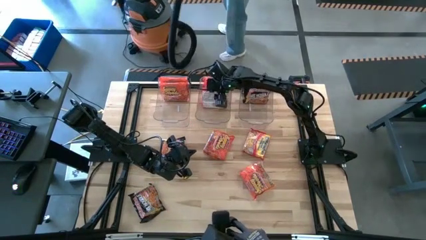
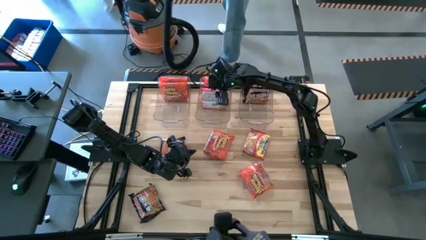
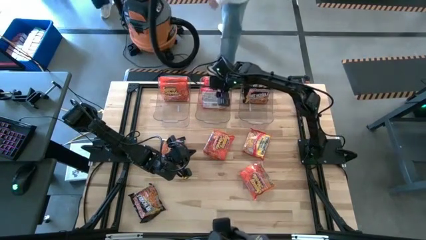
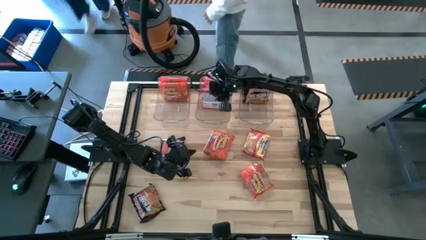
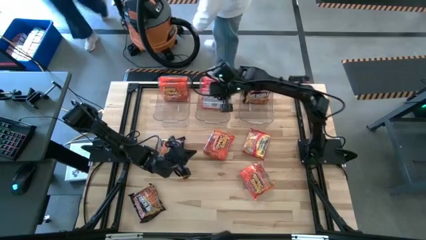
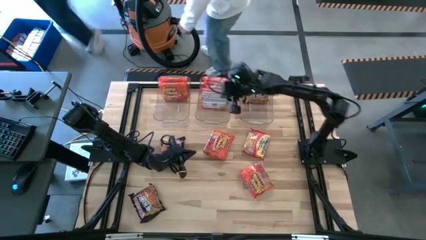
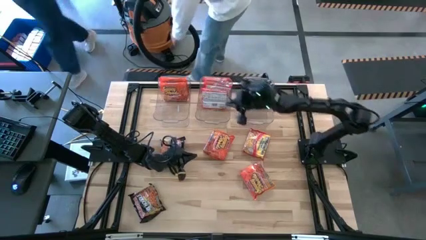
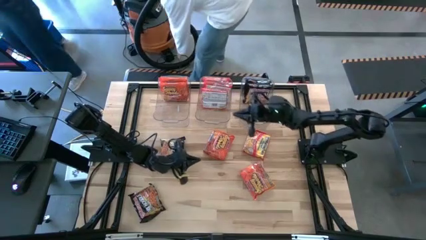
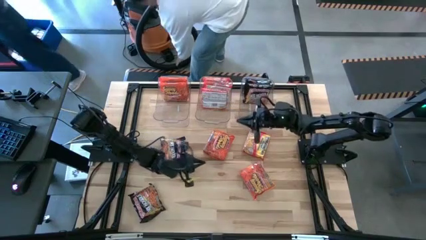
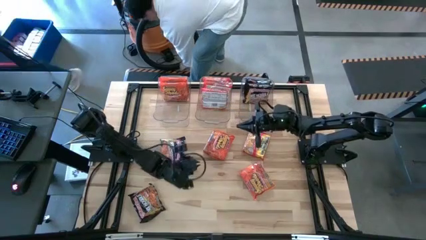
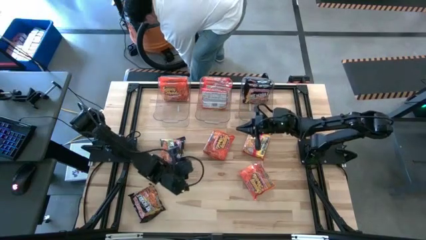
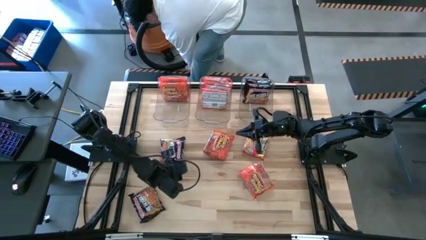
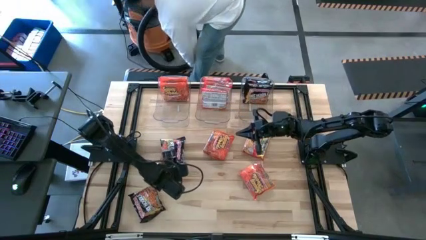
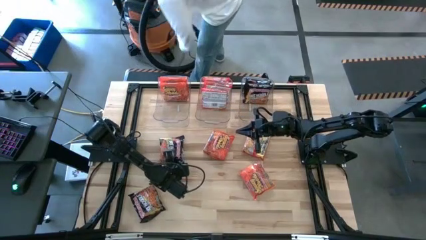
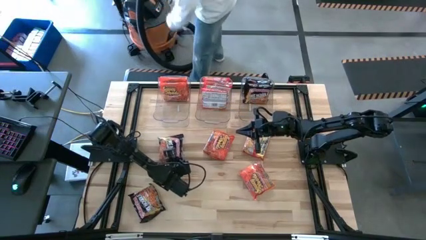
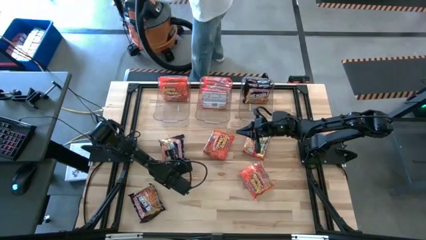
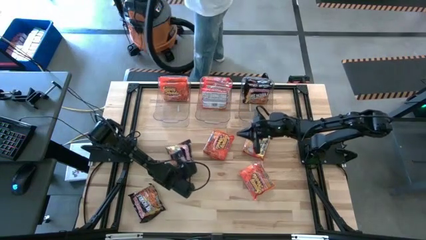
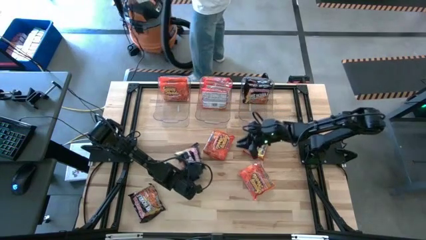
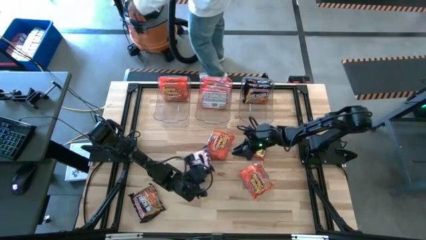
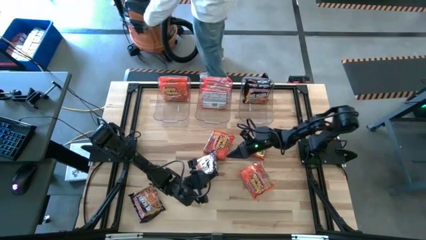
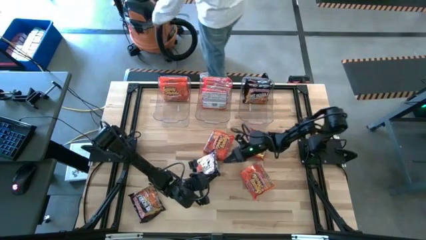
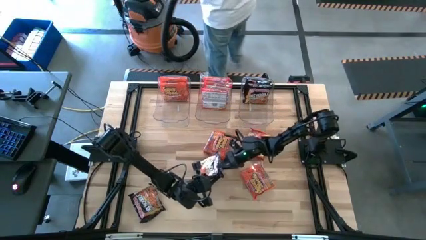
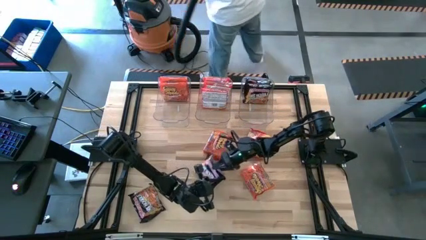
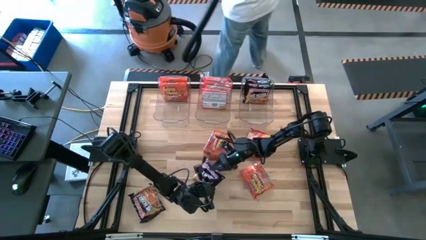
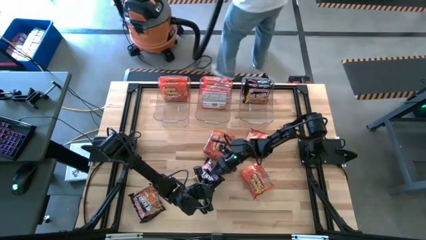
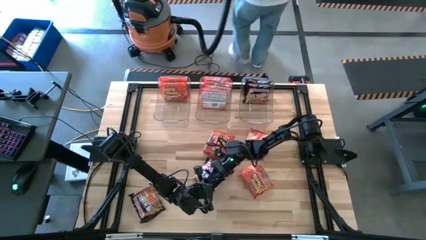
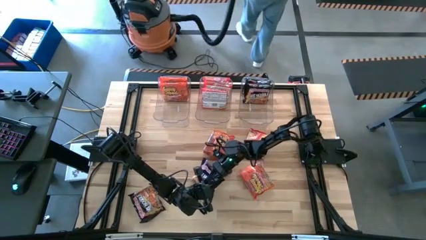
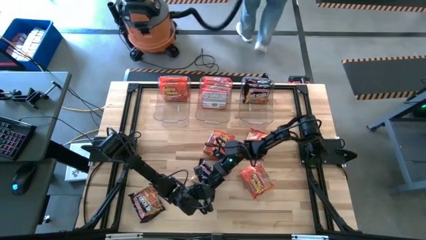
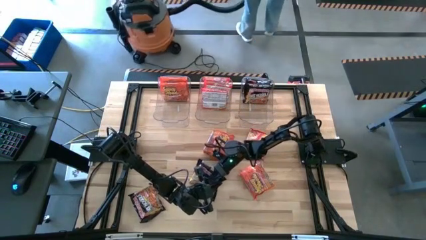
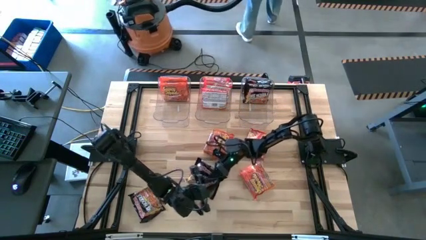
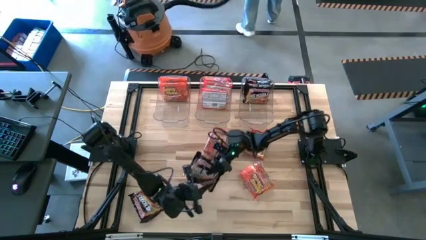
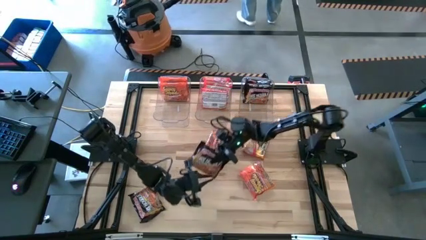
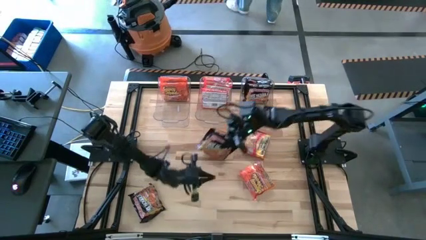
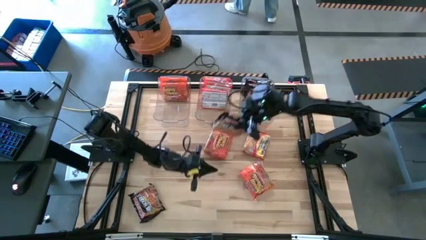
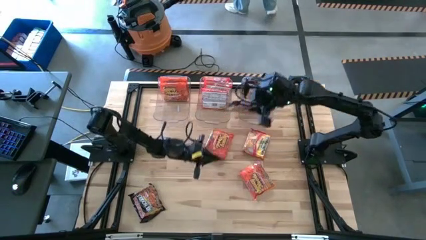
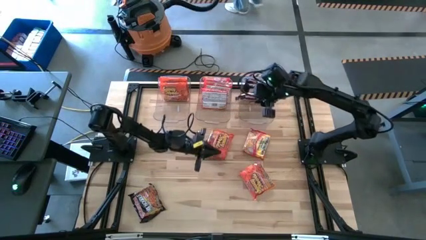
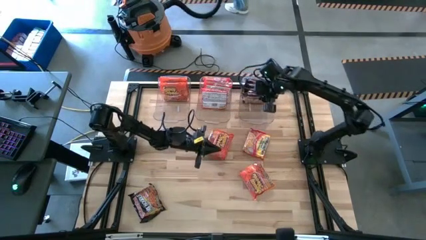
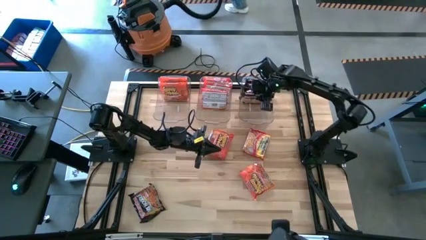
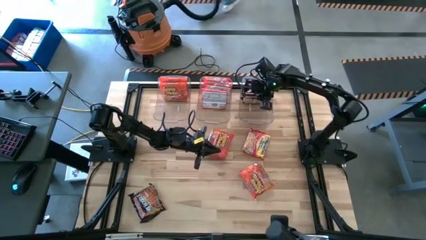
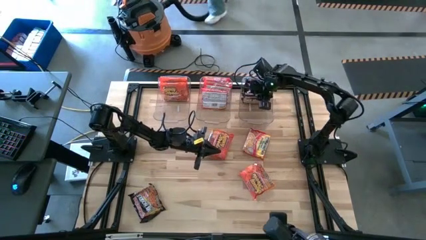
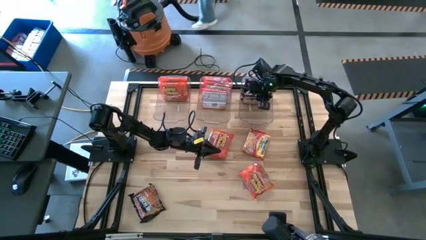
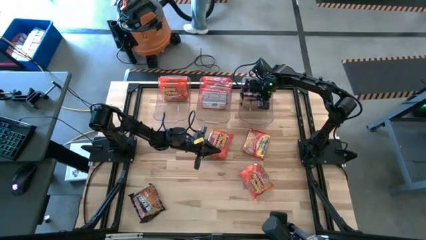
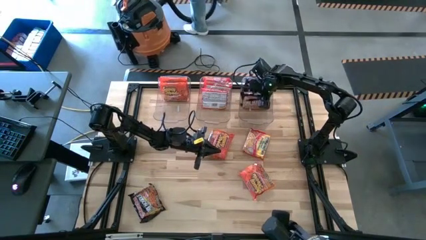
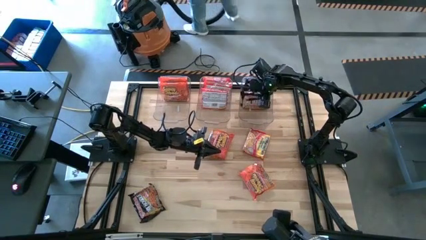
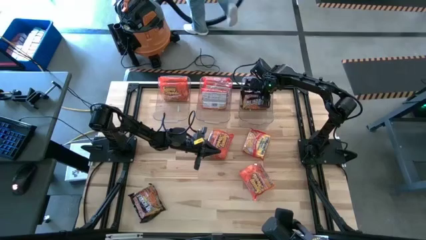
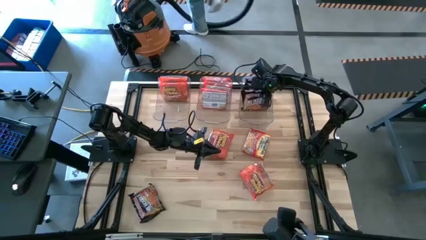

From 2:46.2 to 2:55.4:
Task: Sort Maruchan noodles
Put the black noodle pack into the right transparent bin

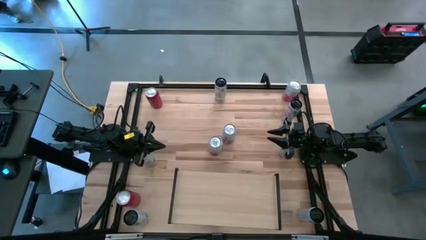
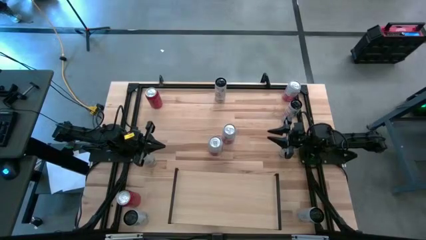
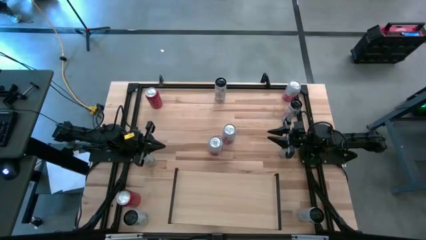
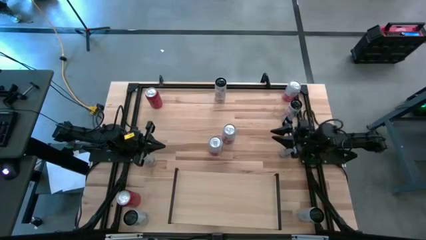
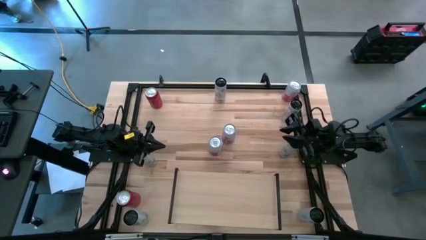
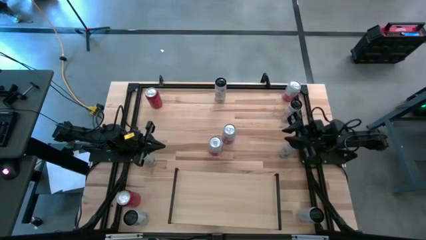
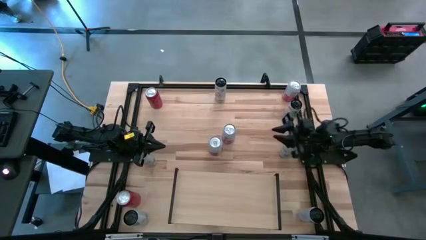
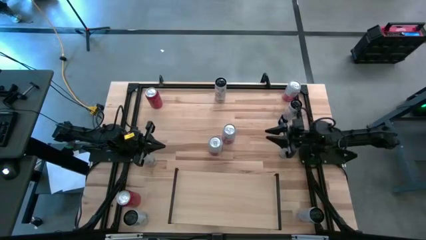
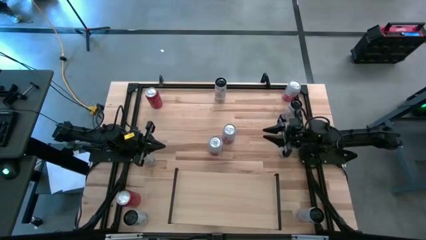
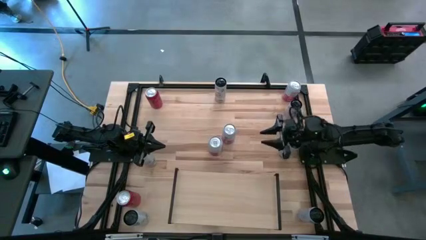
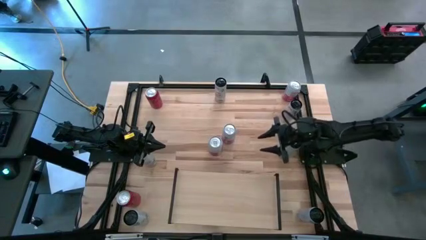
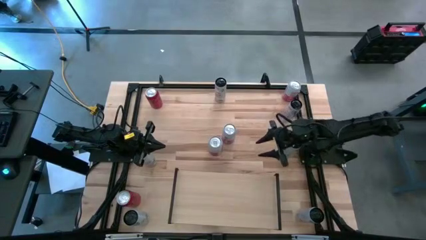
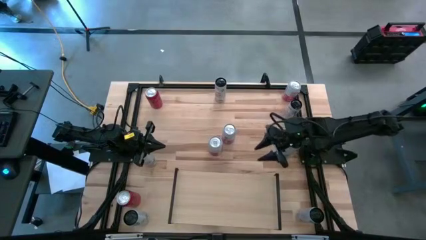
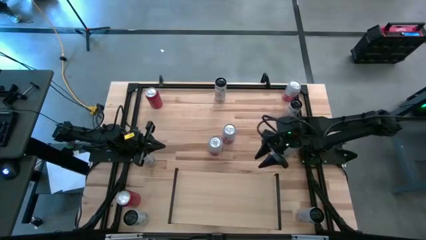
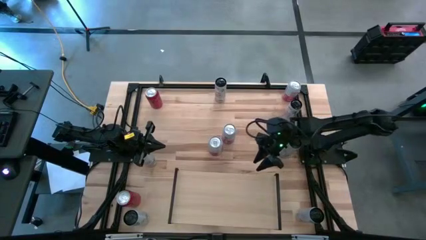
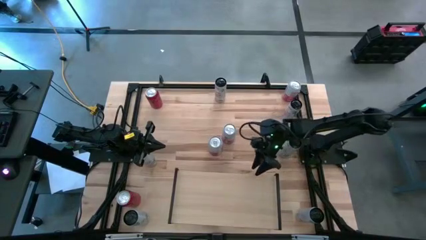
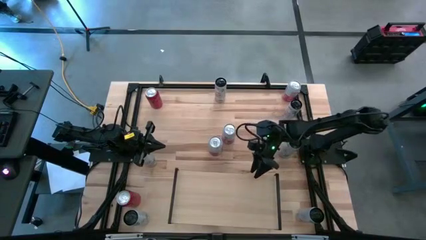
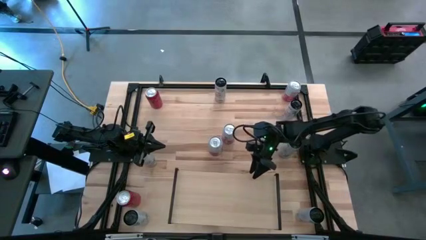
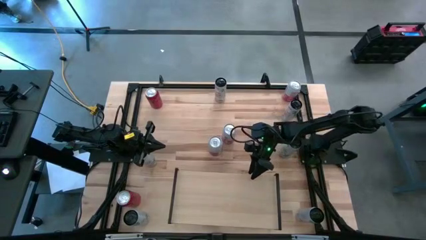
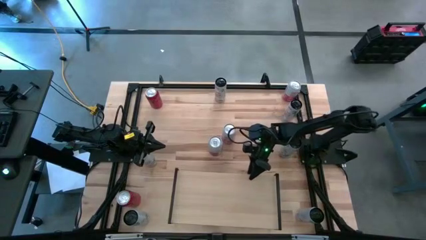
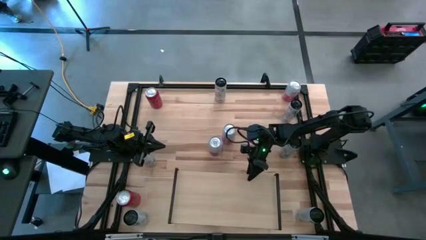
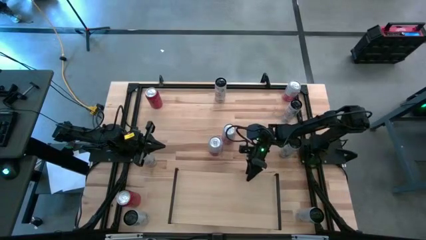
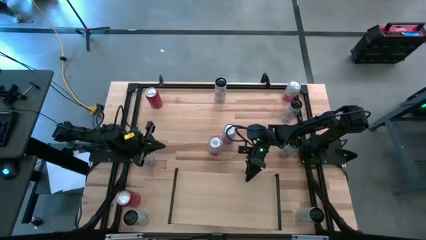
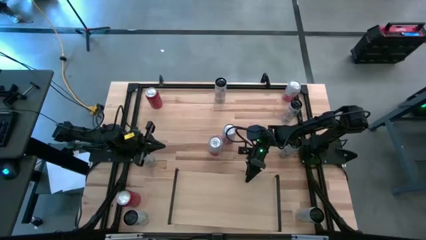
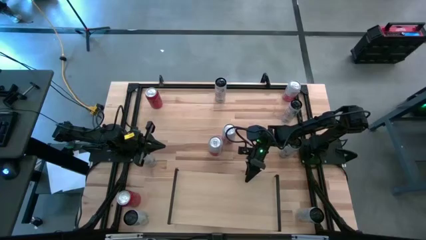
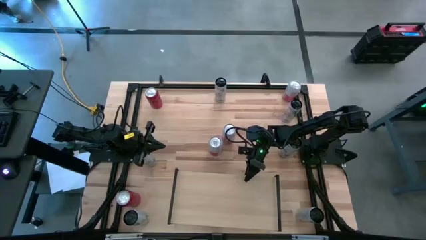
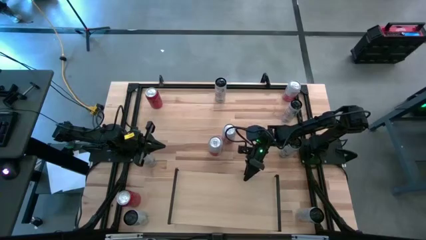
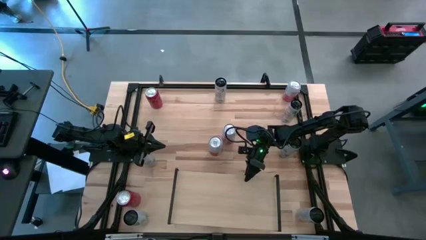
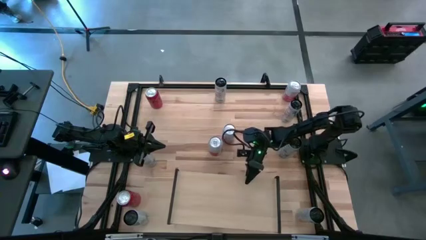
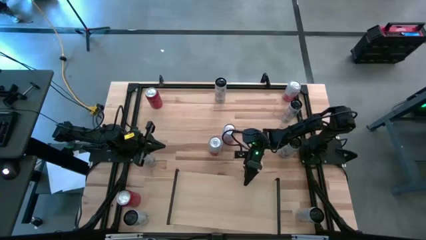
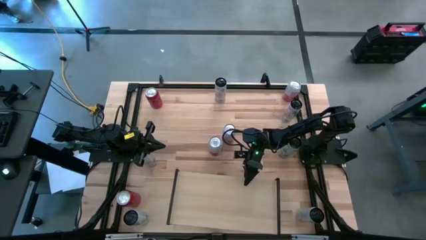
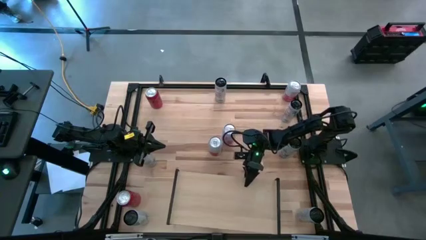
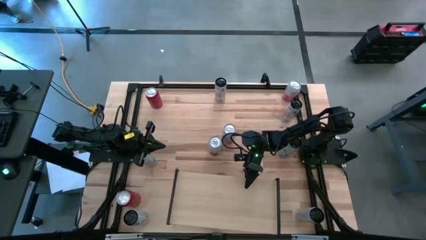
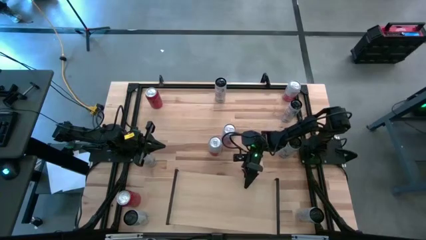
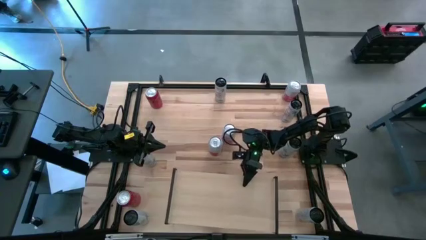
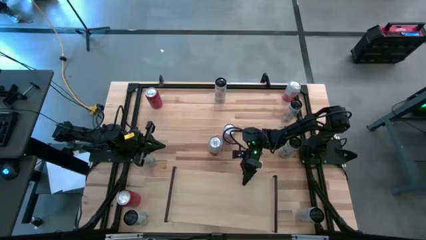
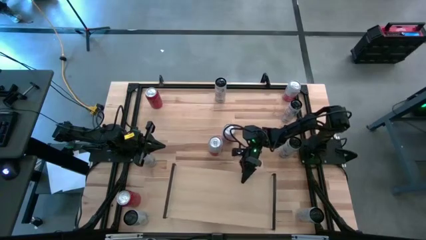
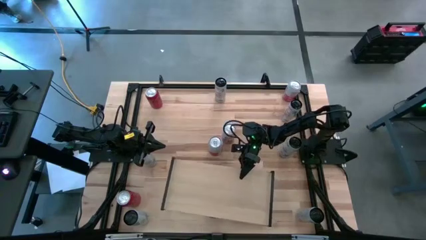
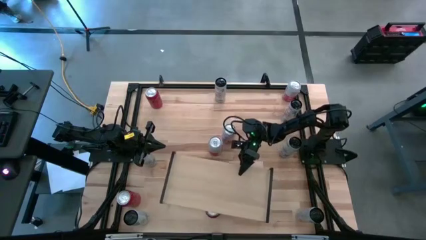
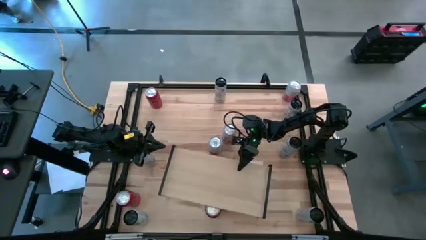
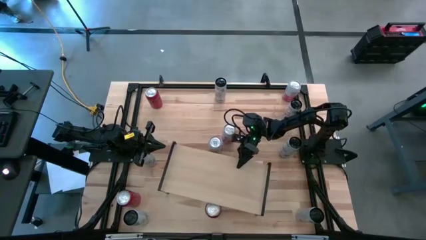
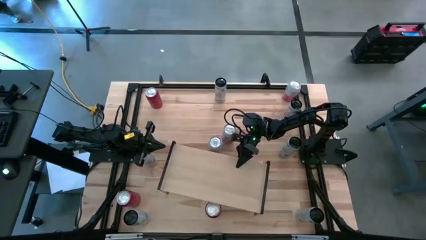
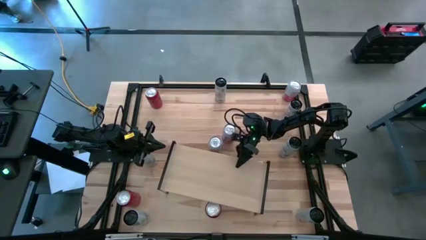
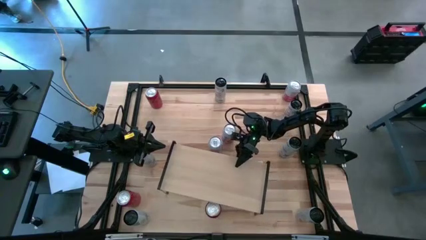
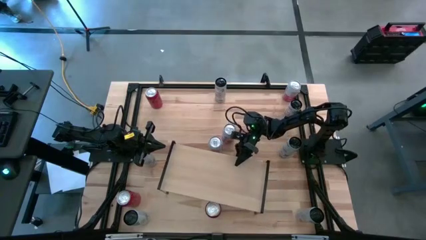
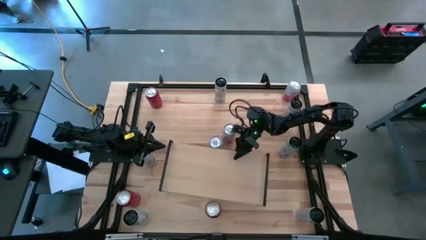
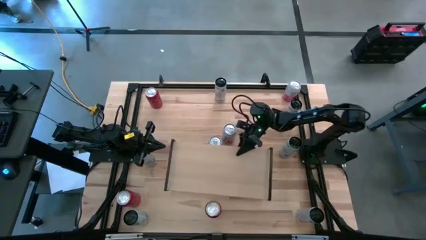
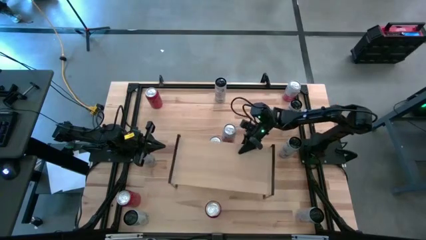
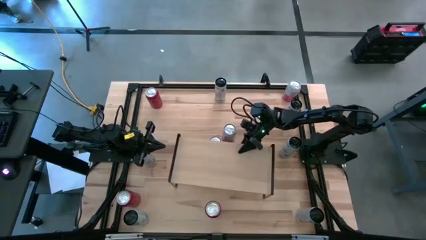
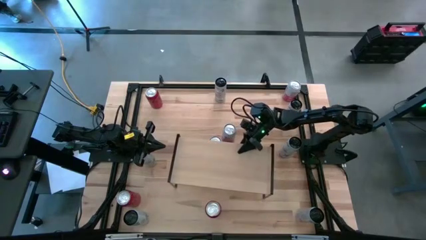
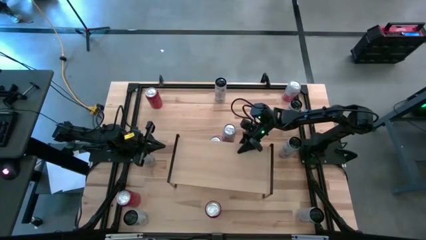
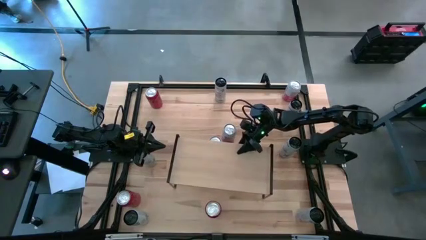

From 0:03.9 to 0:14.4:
Task: Place canned beverage on shelf
Move the shelf to the center of the table
